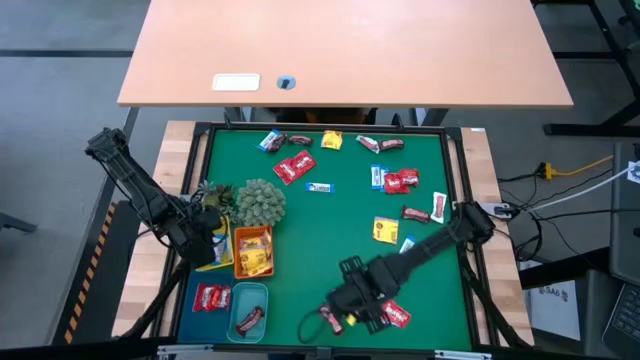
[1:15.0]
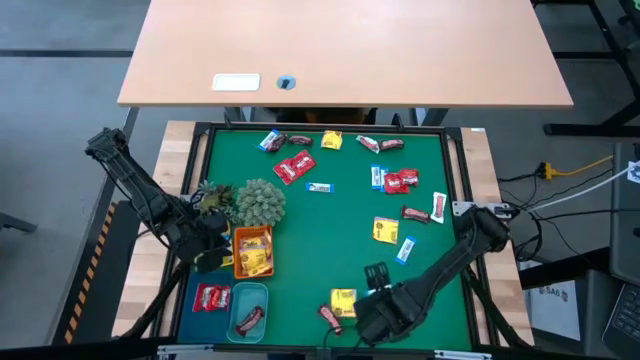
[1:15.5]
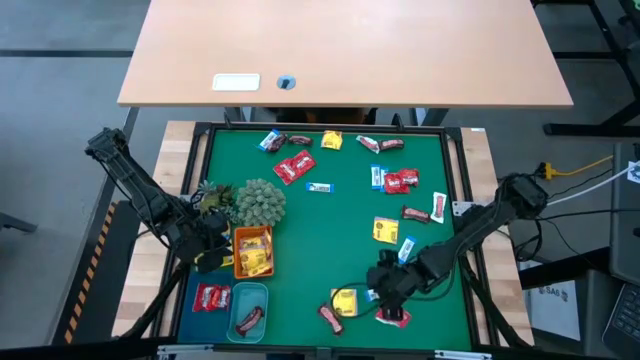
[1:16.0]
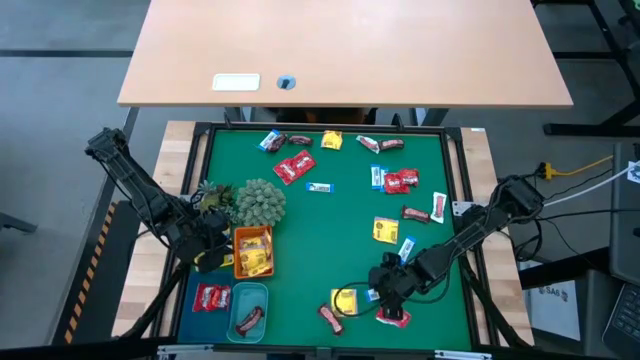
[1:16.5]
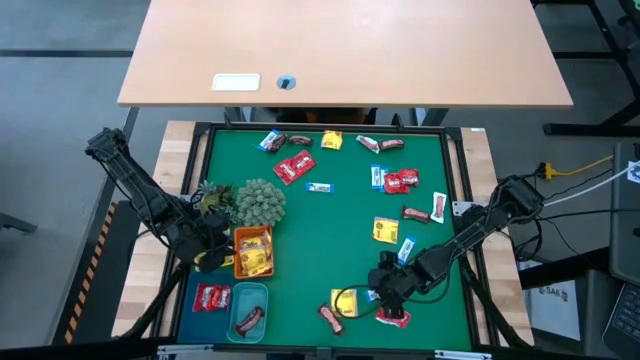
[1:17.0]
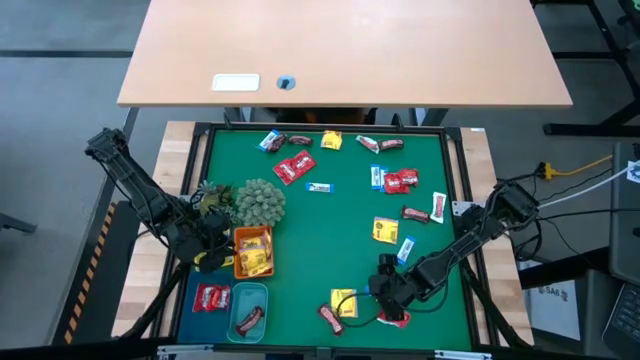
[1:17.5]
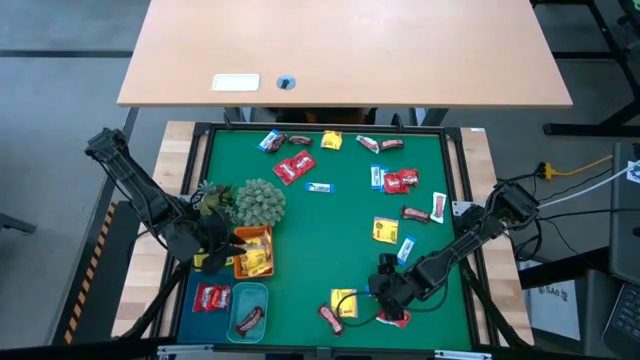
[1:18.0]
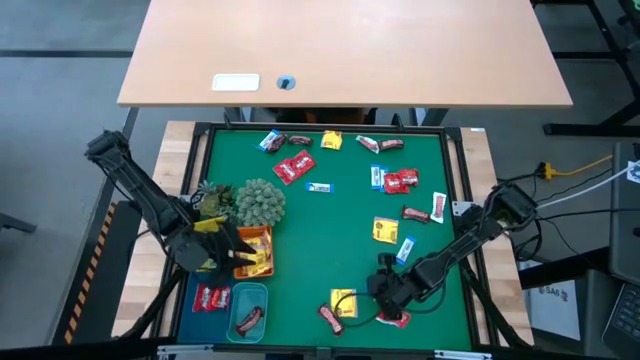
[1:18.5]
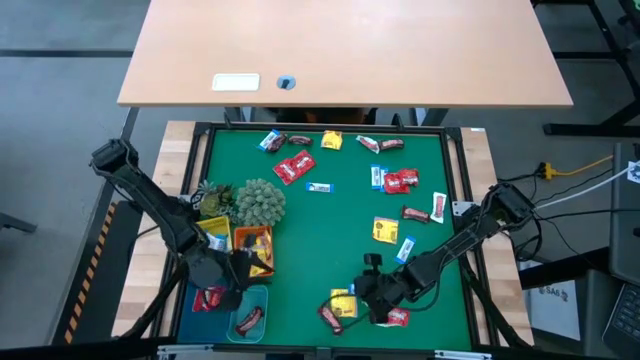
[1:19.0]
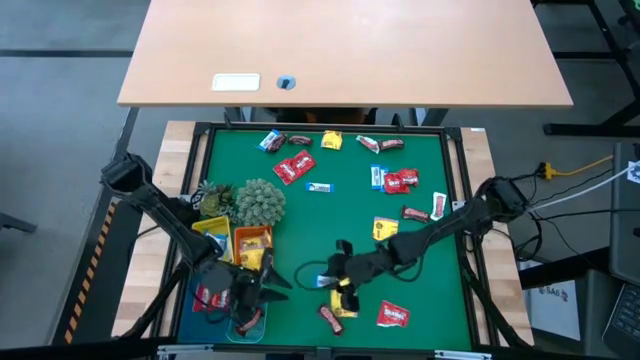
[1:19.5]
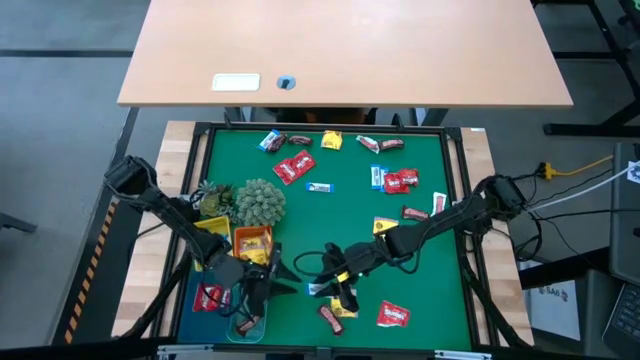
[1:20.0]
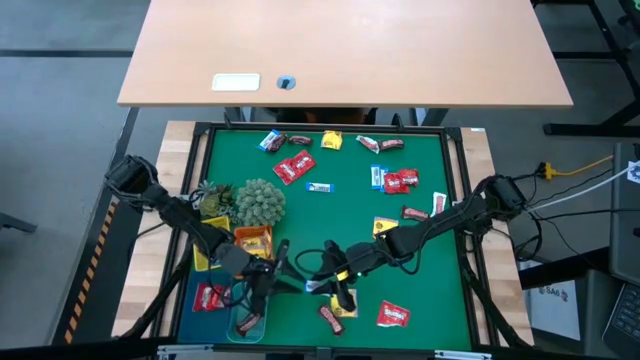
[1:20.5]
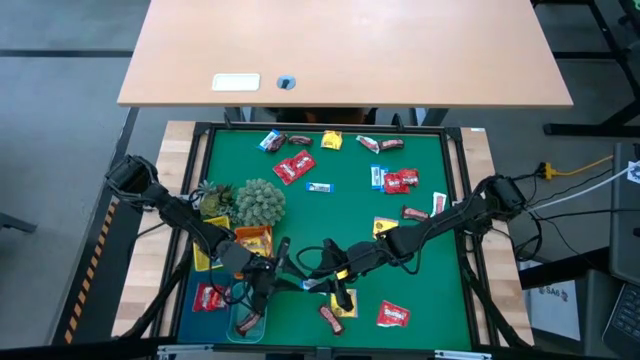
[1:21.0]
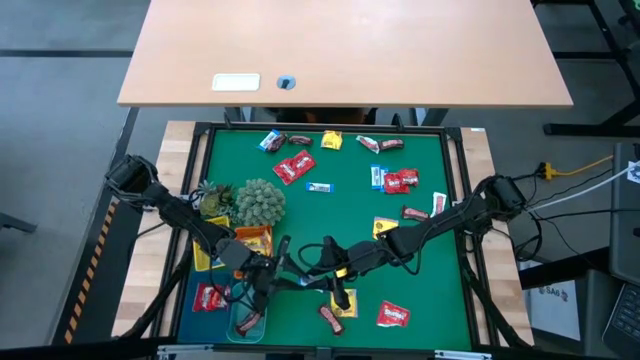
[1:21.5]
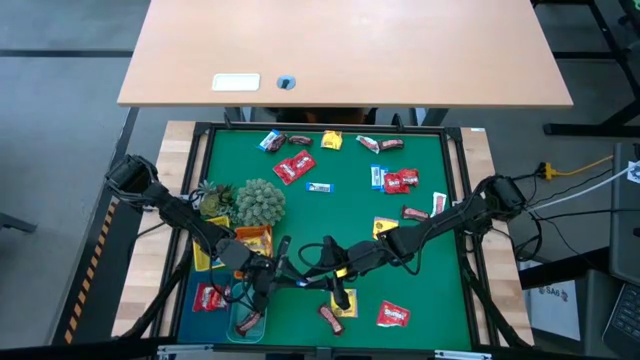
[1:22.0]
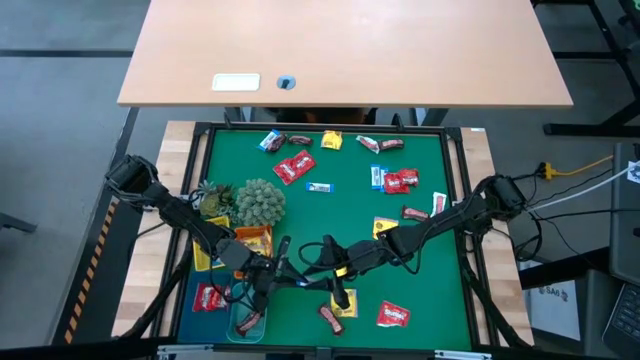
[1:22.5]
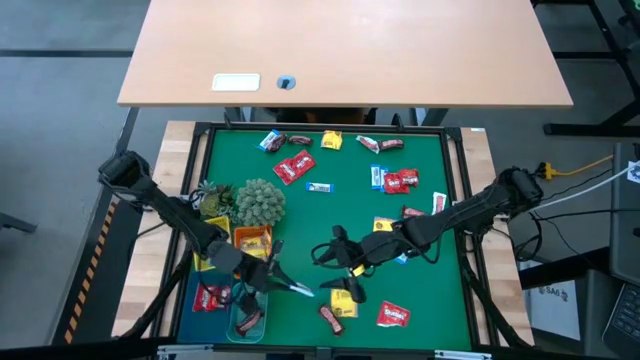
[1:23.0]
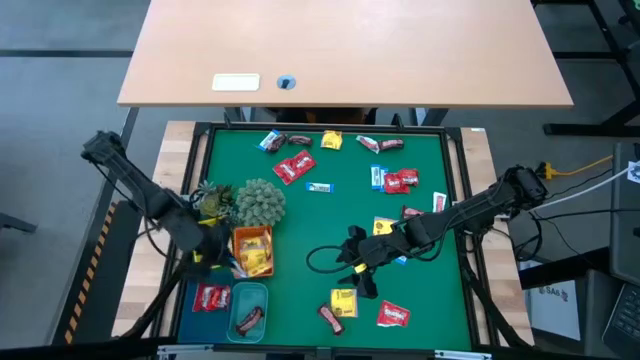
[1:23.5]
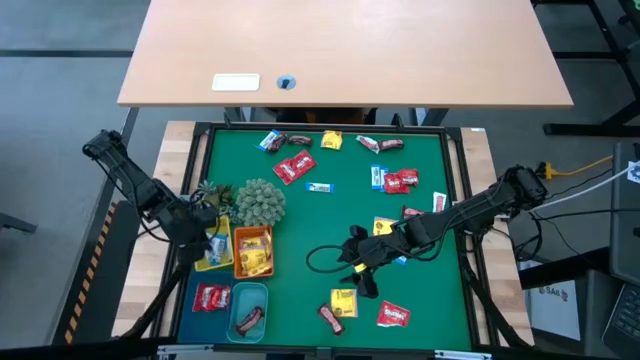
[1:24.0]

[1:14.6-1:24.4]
Task: Sort candy
Put the white chocolate into the yellow basket

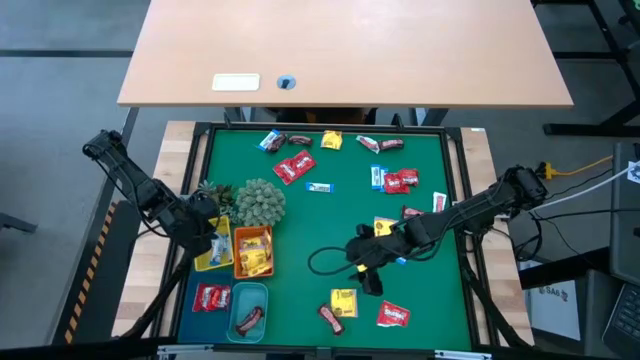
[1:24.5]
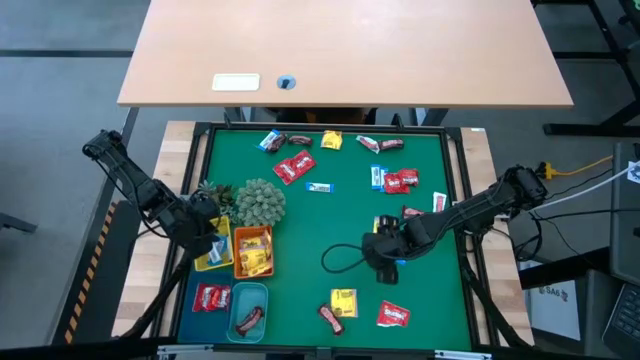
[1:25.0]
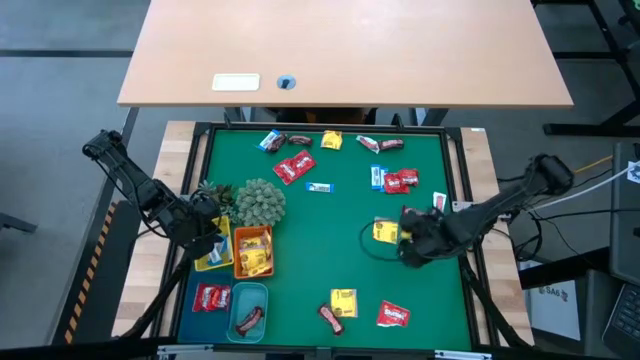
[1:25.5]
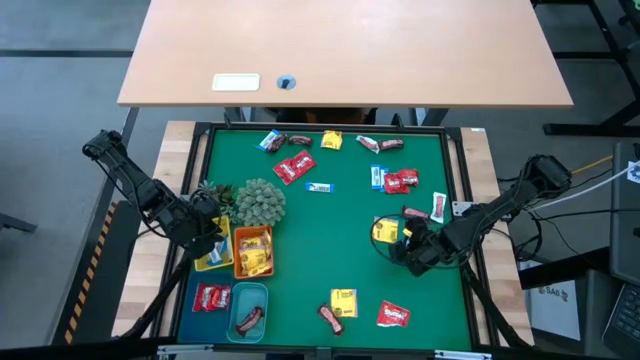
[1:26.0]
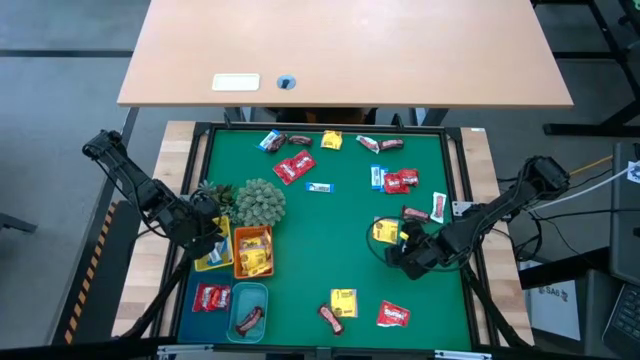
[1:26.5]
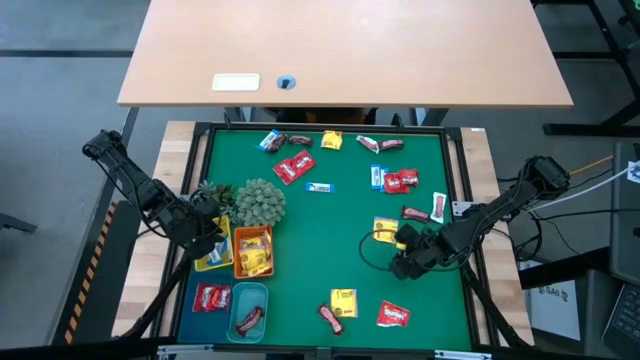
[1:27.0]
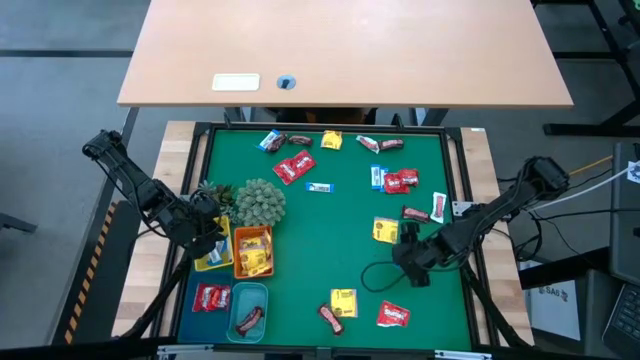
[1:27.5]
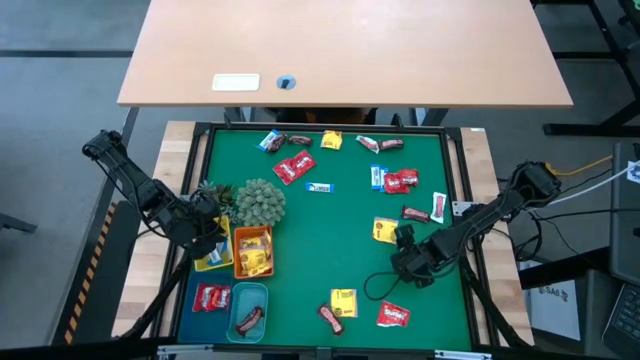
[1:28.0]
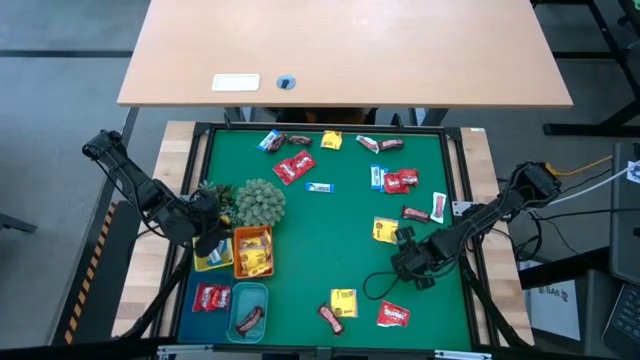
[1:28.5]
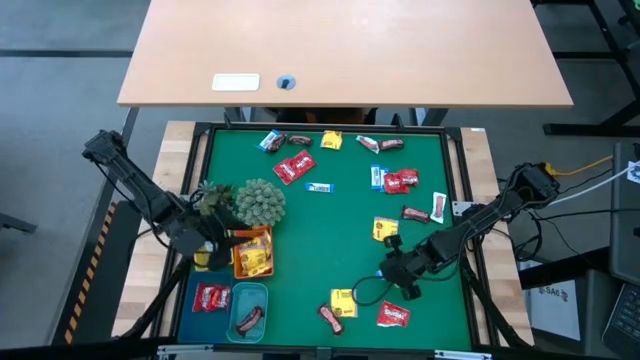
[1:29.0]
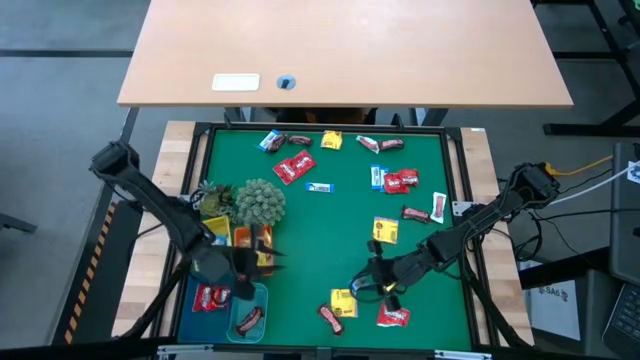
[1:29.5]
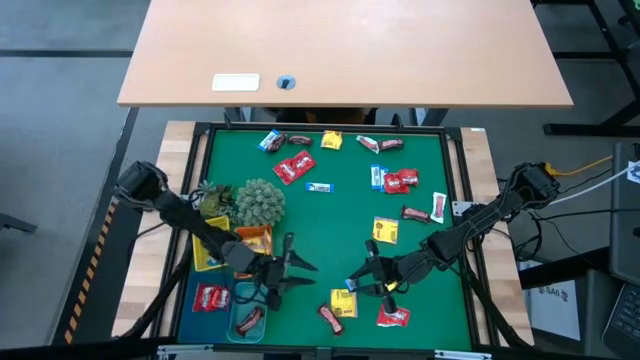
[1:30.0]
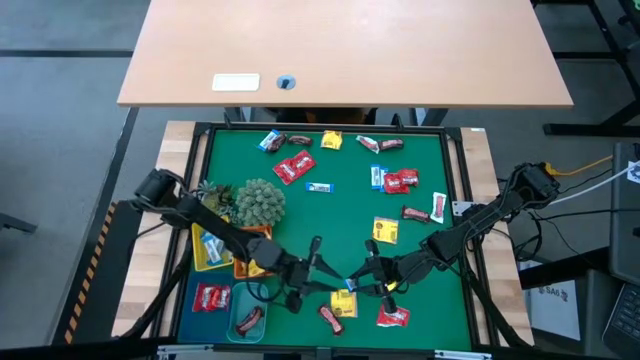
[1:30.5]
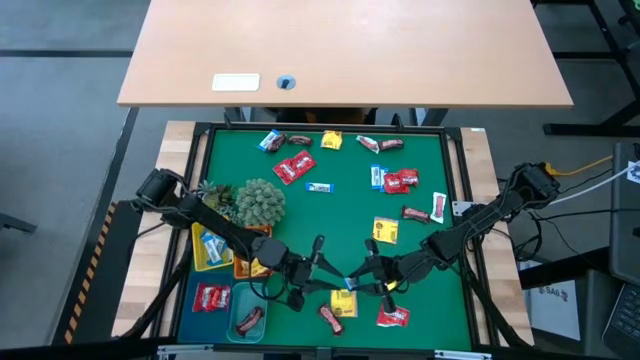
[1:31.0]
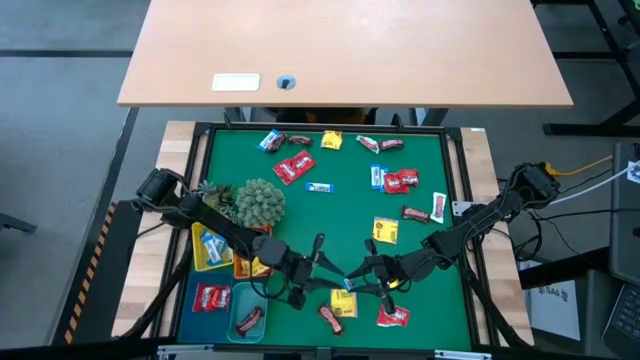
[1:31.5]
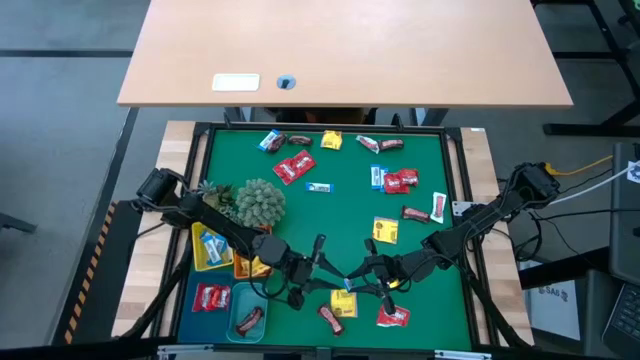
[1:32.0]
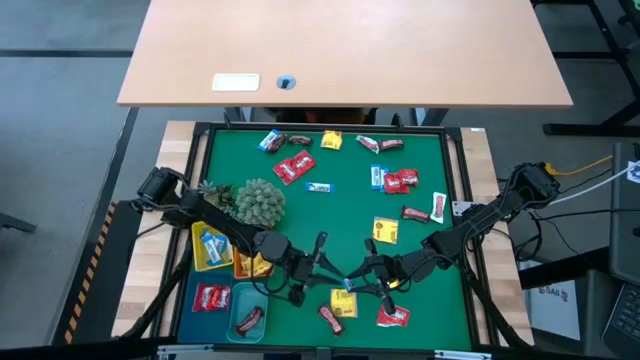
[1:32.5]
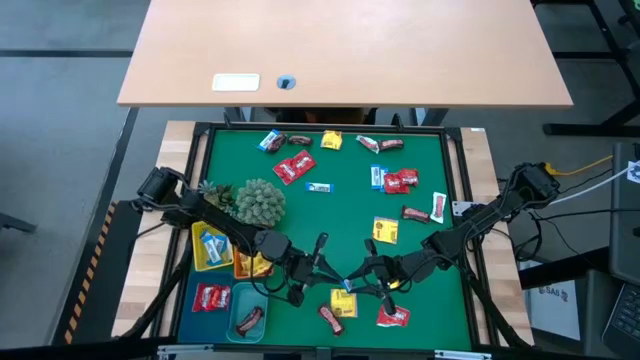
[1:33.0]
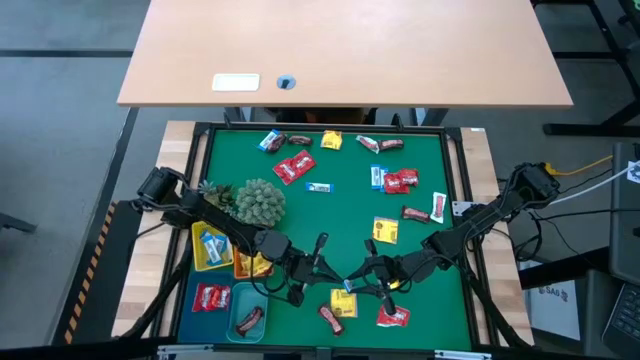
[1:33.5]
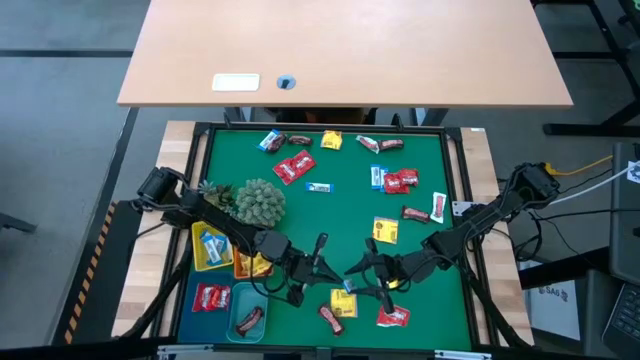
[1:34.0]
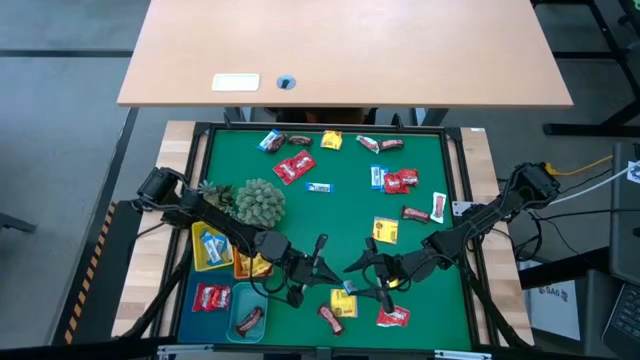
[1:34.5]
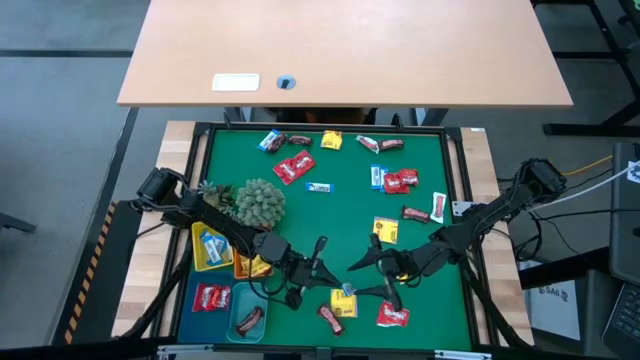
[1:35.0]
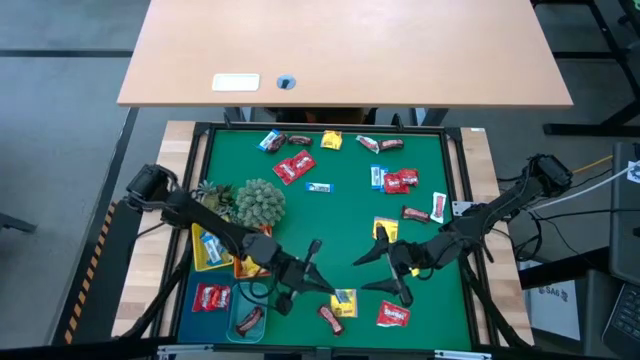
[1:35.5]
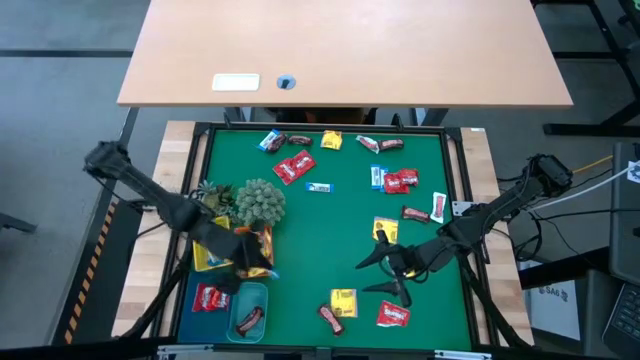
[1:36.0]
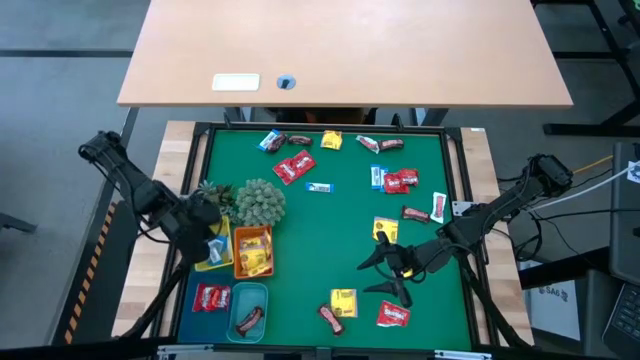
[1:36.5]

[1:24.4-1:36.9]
Put the white chocolate into the yellow basket
